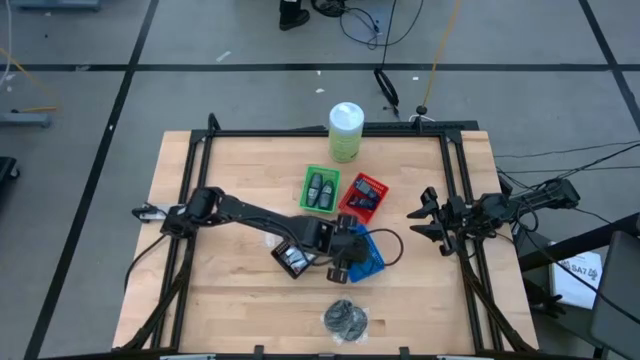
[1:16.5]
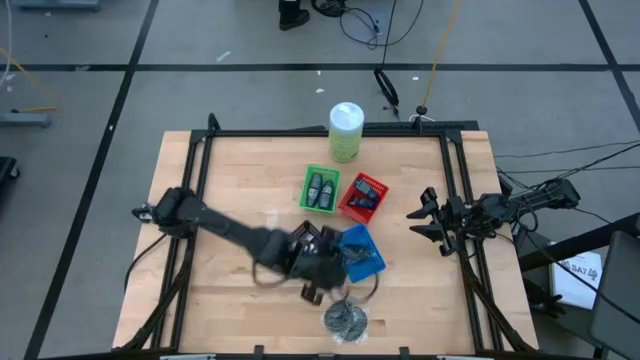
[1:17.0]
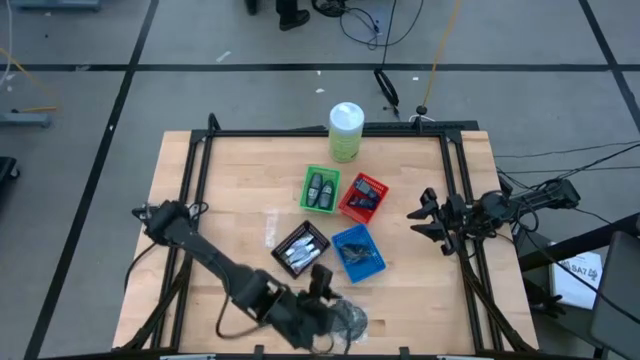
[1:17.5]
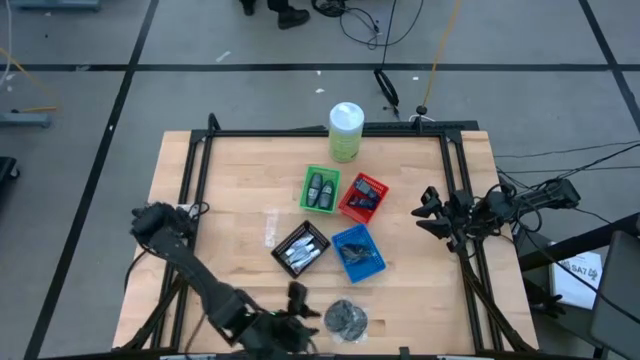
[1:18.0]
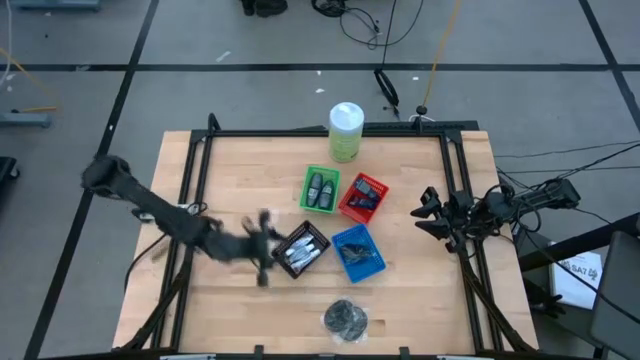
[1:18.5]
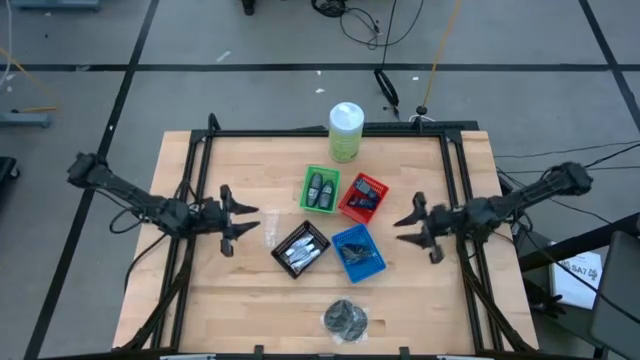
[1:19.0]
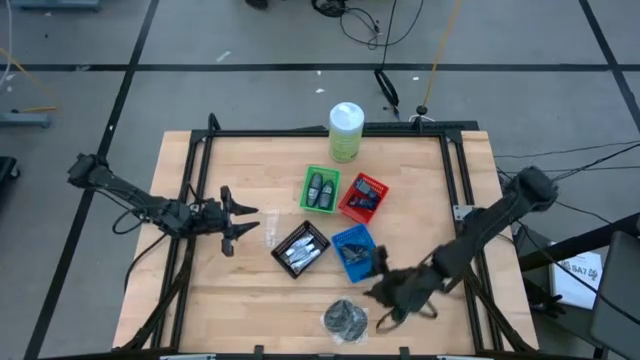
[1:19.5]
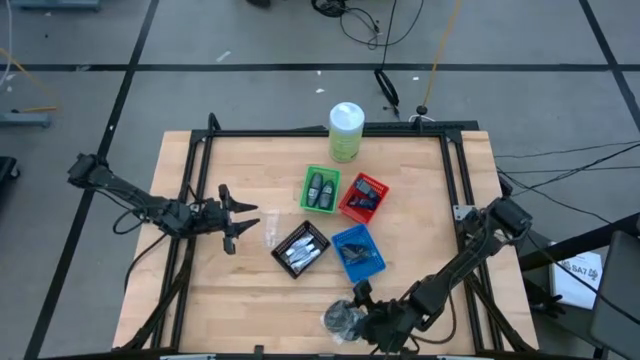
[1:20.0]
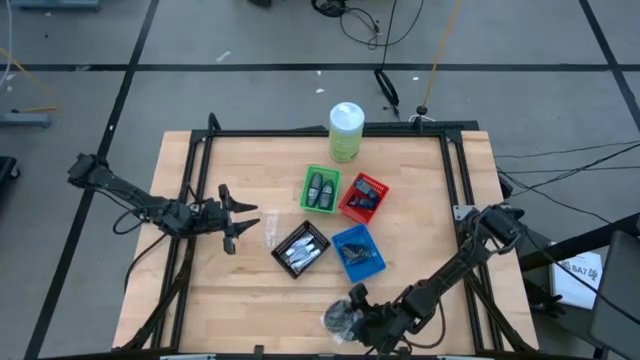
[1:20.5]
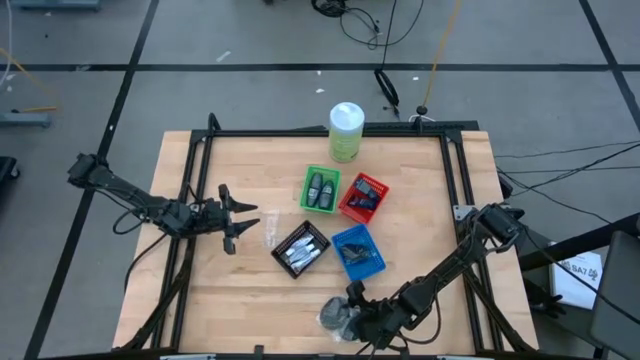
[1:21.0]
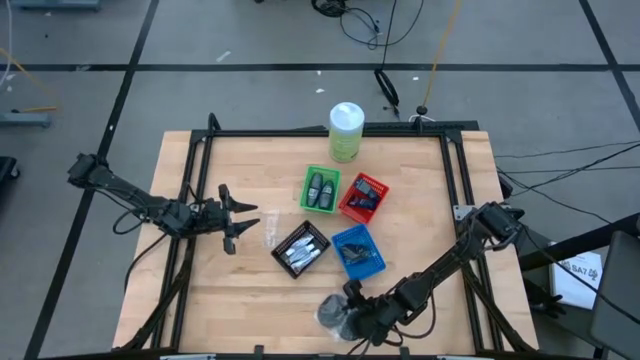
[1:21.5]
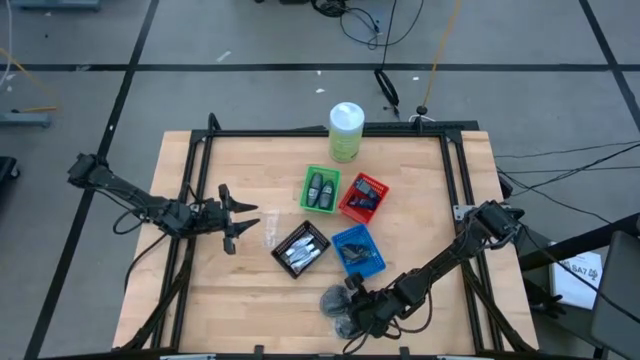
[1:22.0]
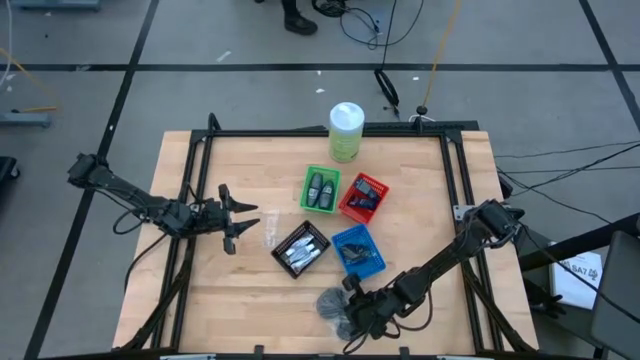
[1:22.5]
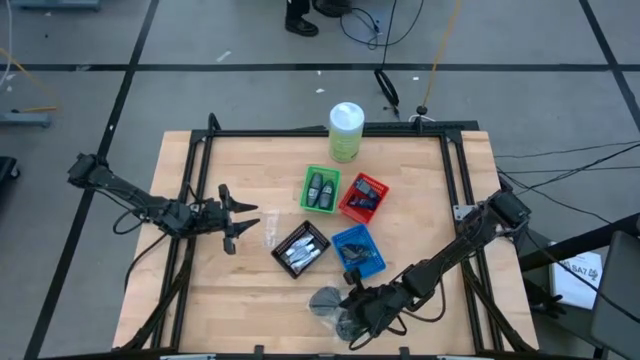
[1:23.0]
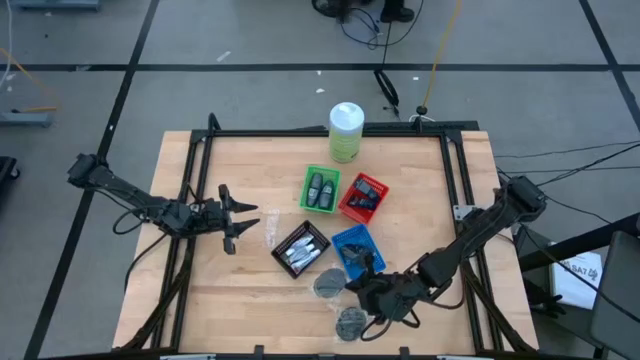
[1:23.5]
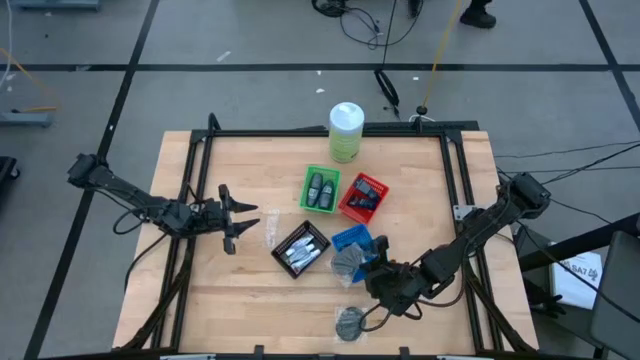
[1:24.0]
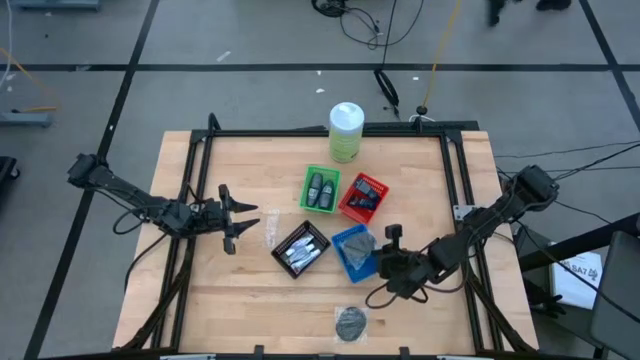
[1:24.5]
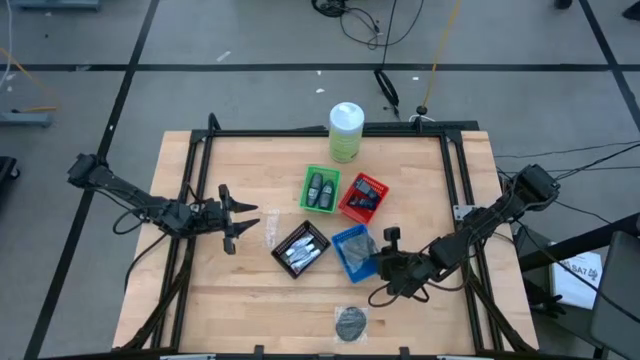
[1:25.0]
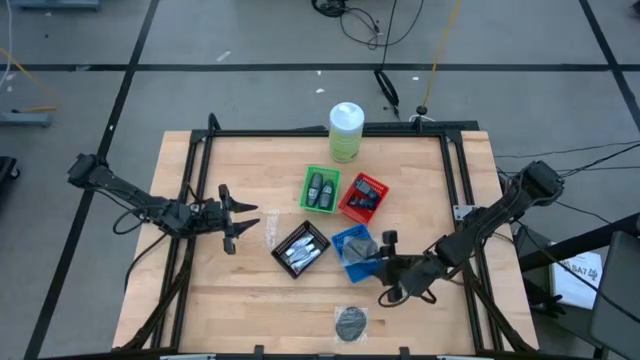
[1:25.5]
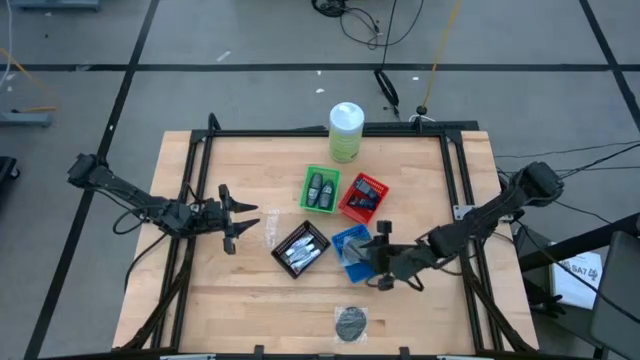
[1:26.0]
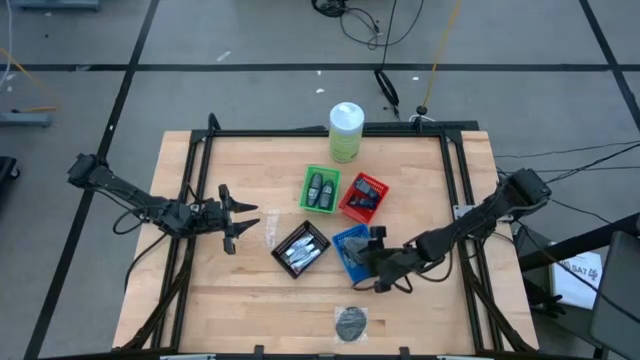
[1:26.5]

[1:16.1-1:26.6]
Task: Pick & Place Travel size toiletries
Put the left black hairbrush into the blue bin

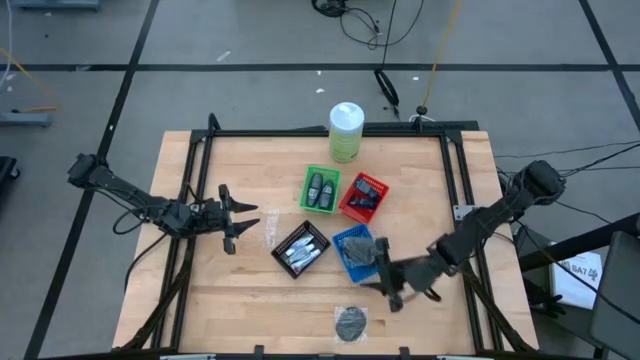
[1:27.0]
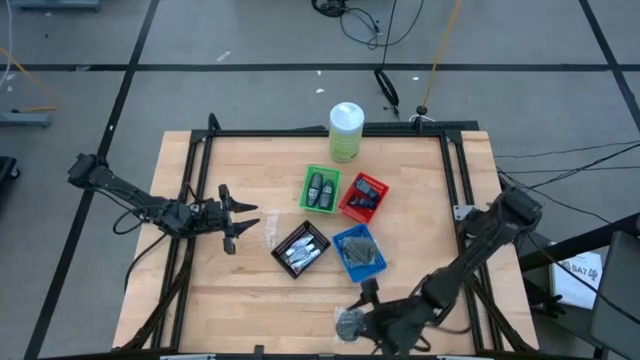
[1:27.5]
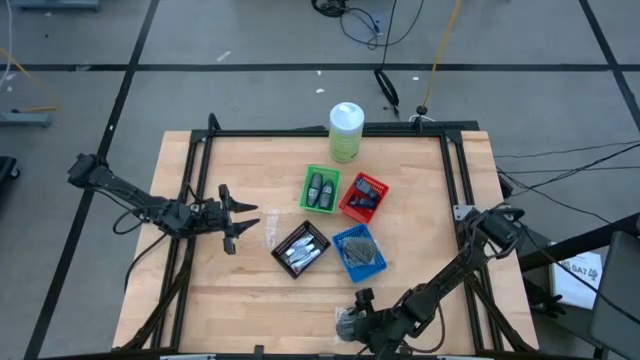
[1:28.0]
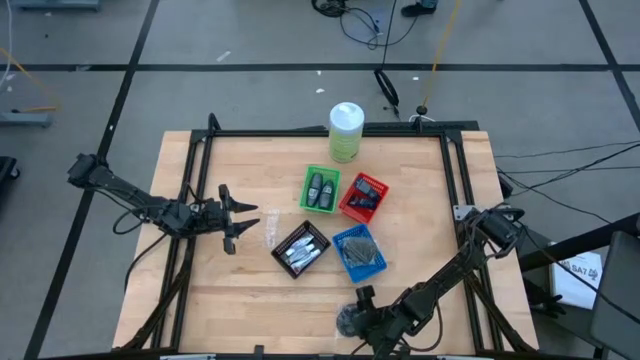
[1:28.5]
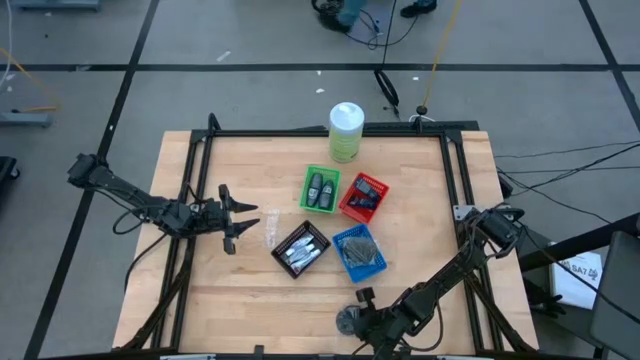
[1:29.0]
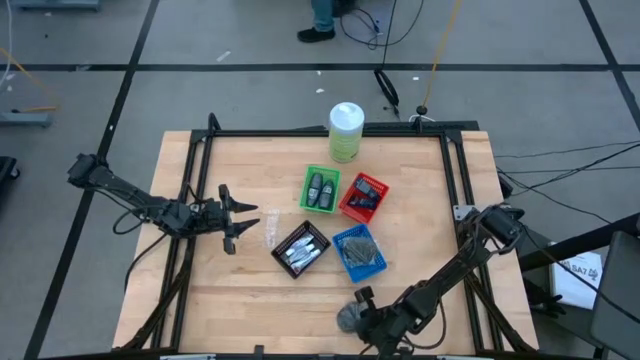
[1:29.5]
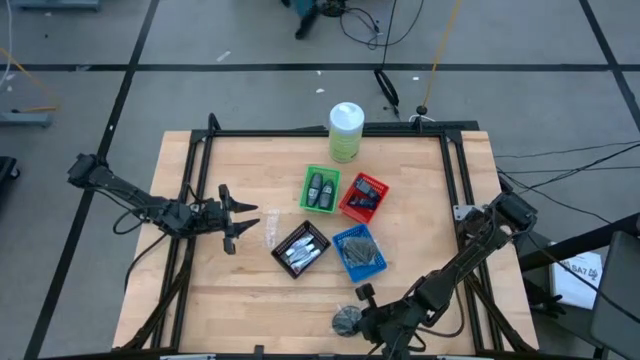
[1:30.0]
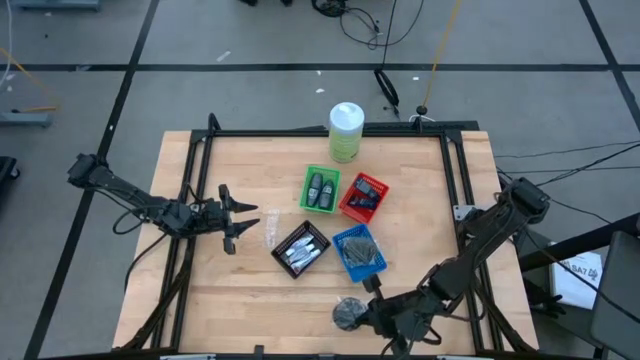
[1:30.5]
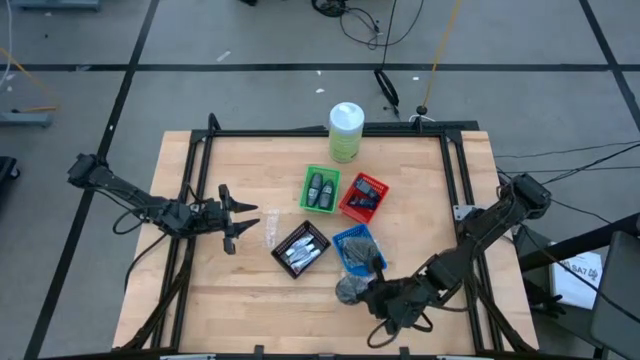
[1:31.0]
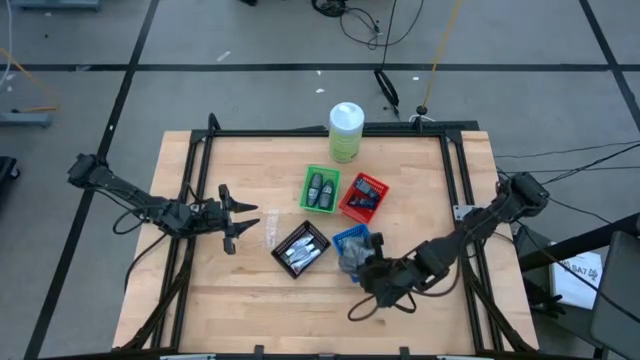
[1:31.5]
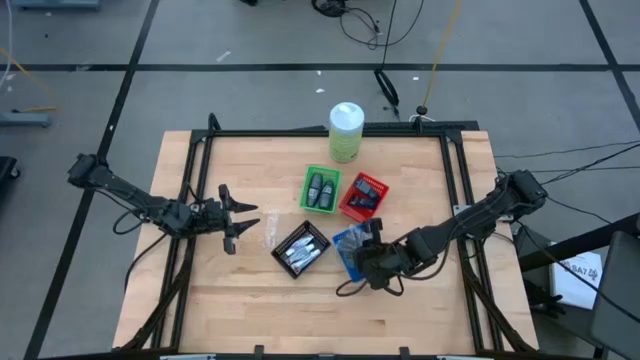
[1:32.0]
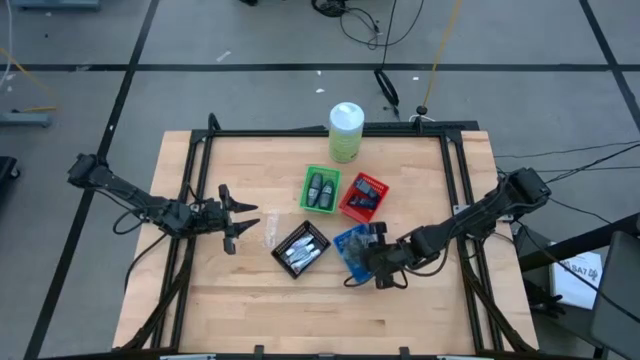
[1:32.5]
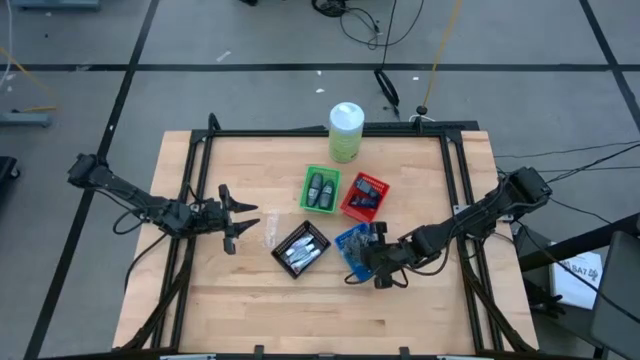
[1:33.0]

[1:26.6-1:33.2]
Put the black hairbrush into the blue bin

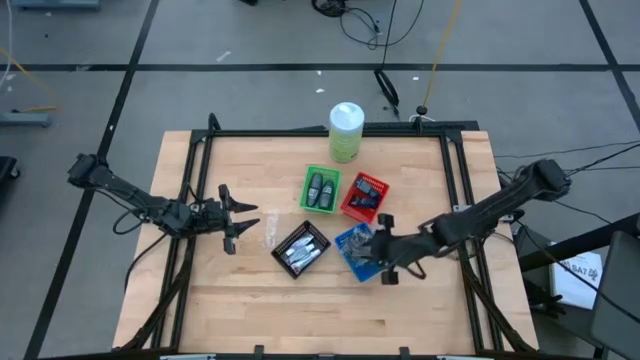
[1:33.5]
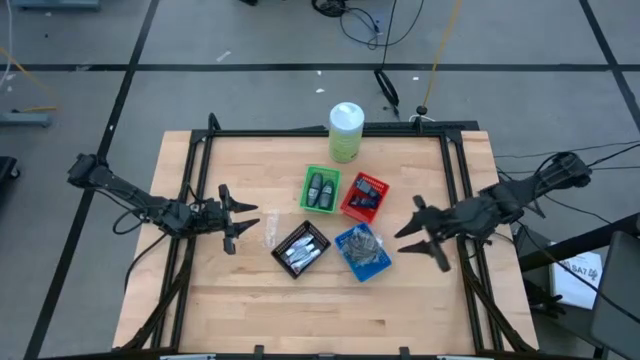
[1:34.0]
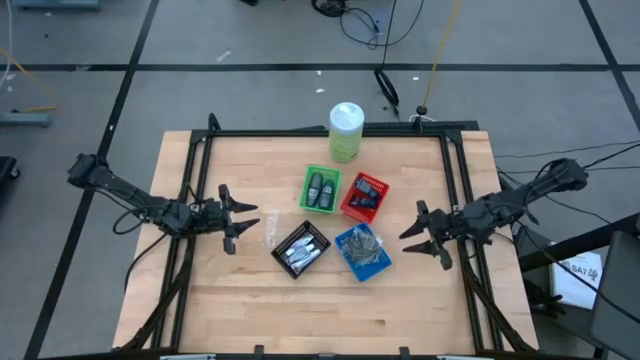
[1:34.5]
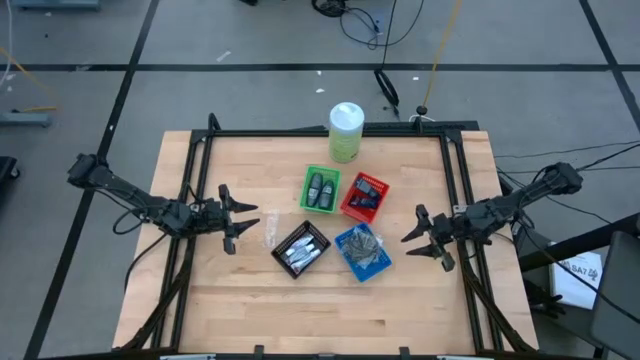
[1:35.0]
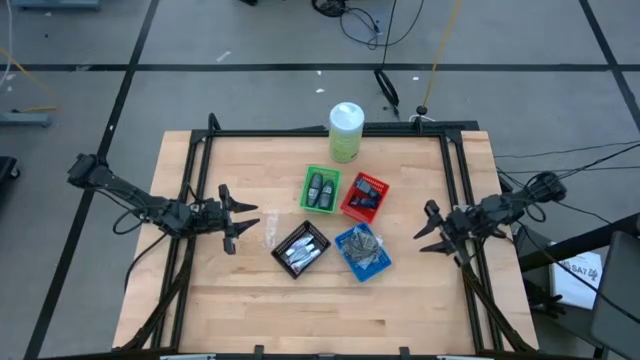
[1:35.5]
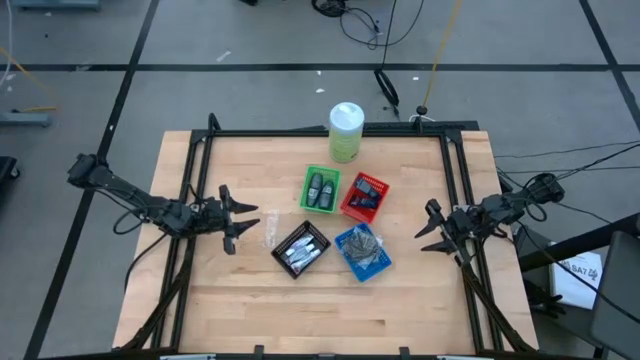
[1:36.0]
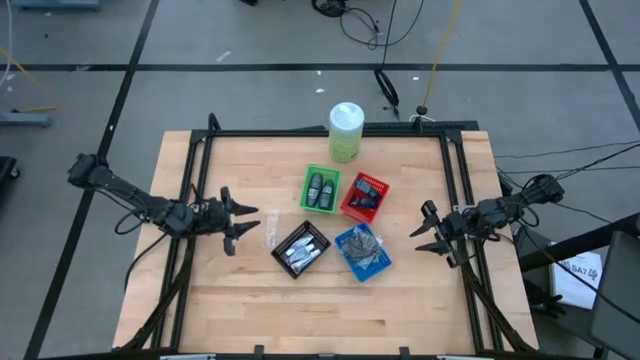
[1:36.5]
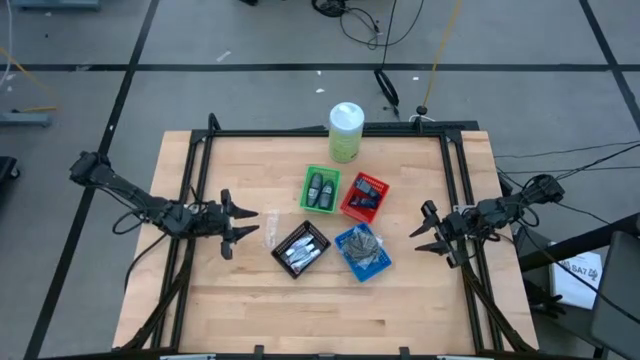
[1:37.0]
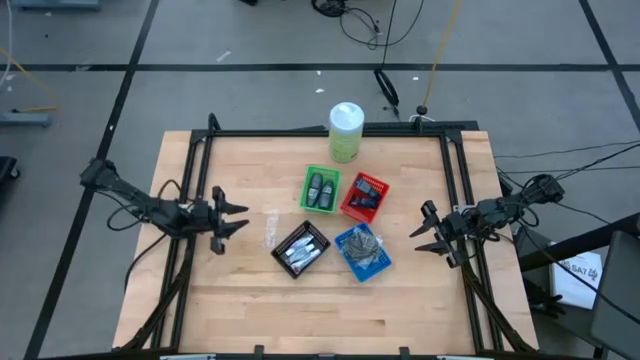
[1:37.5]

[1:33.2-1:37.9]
Return to Home Position
